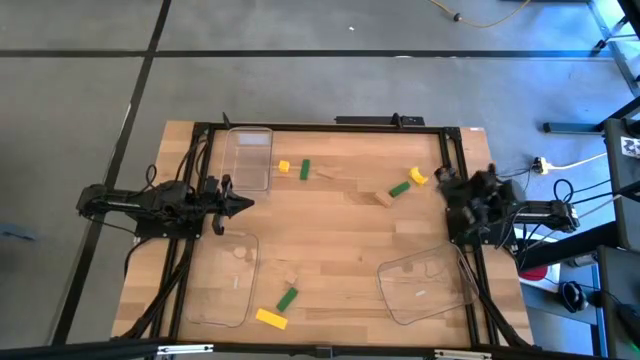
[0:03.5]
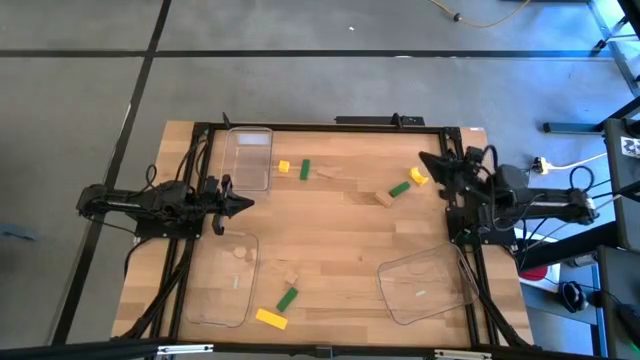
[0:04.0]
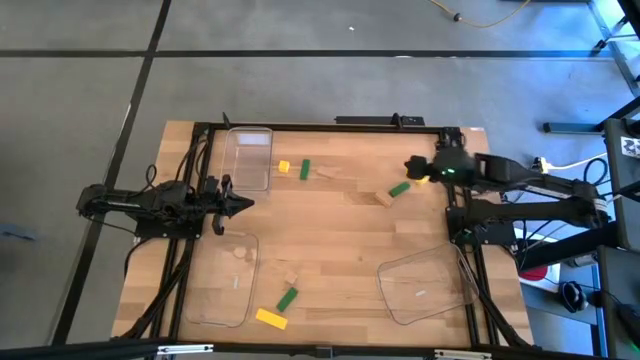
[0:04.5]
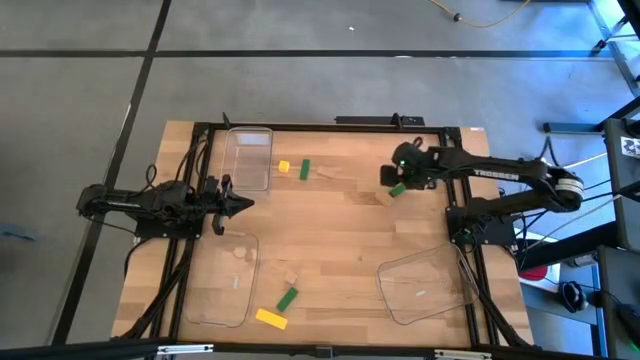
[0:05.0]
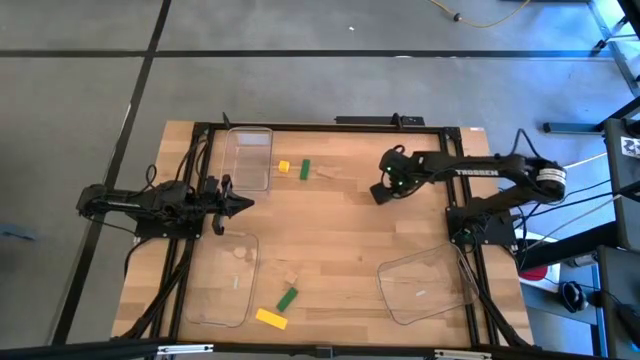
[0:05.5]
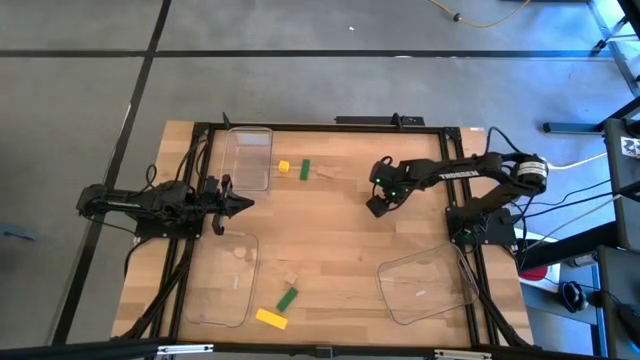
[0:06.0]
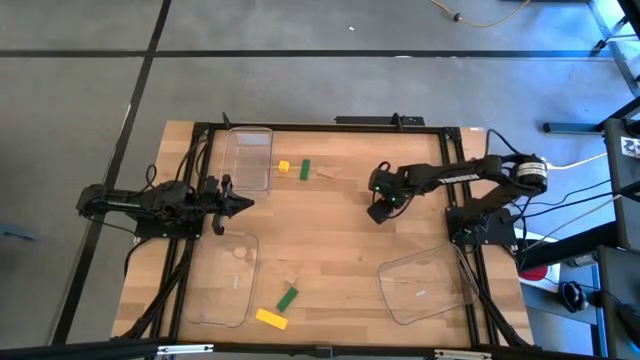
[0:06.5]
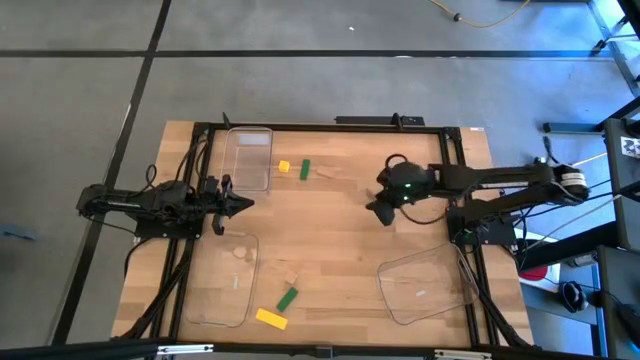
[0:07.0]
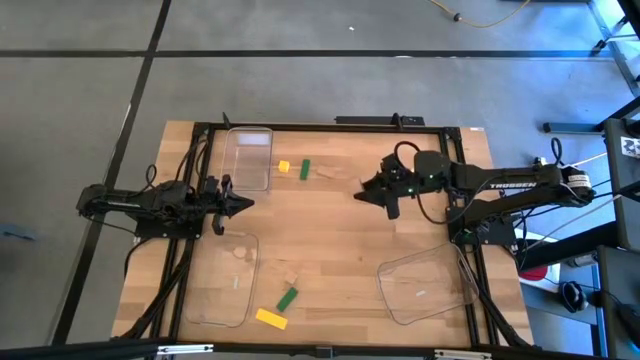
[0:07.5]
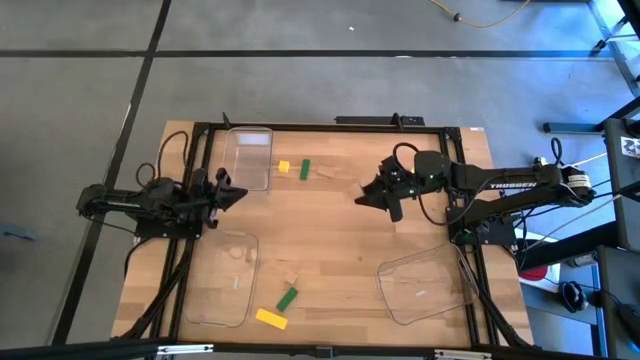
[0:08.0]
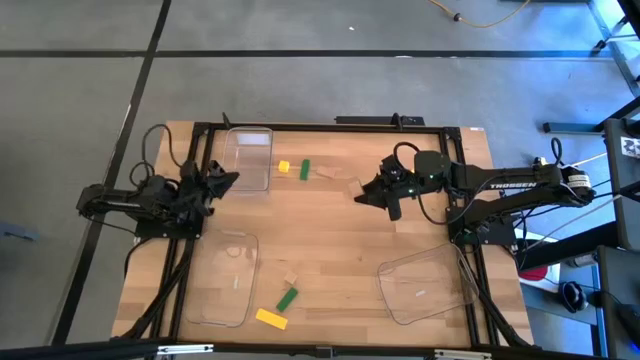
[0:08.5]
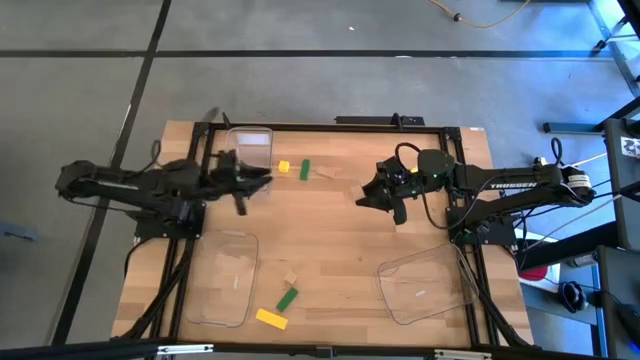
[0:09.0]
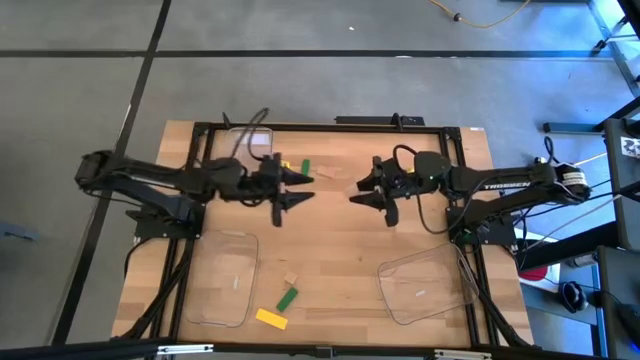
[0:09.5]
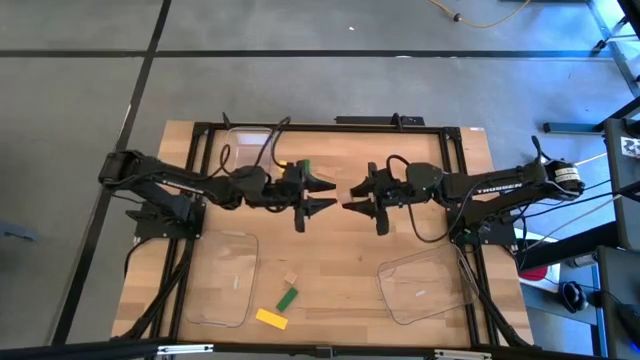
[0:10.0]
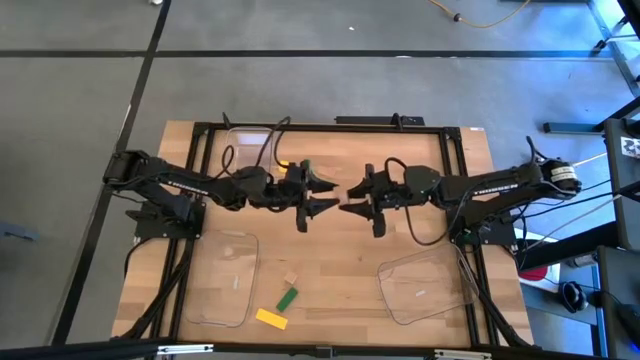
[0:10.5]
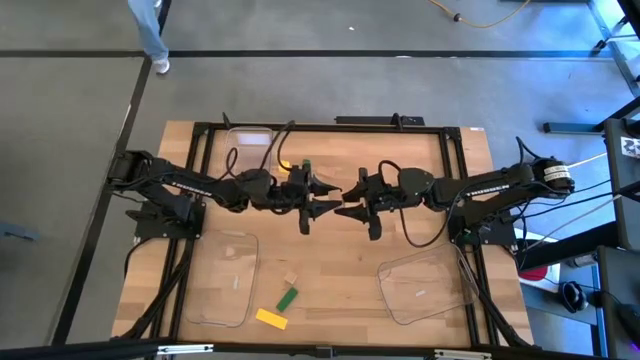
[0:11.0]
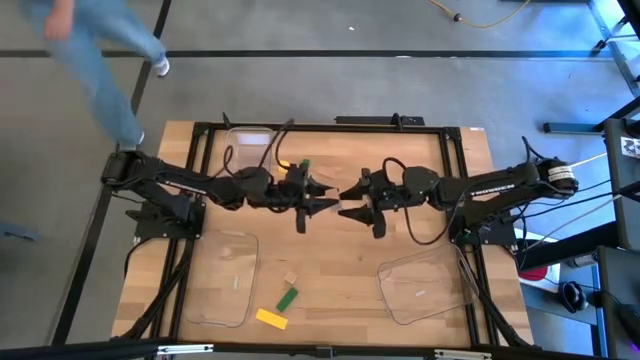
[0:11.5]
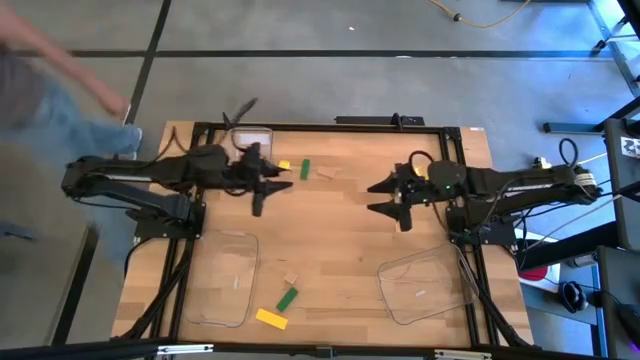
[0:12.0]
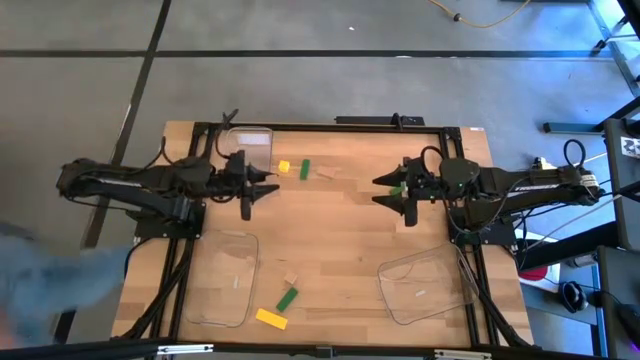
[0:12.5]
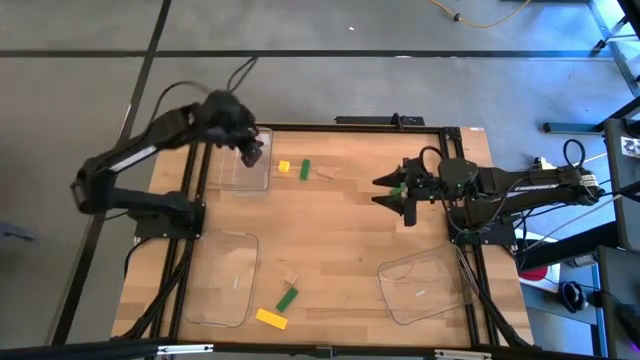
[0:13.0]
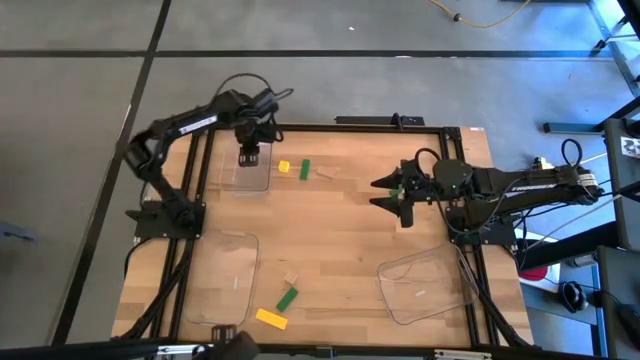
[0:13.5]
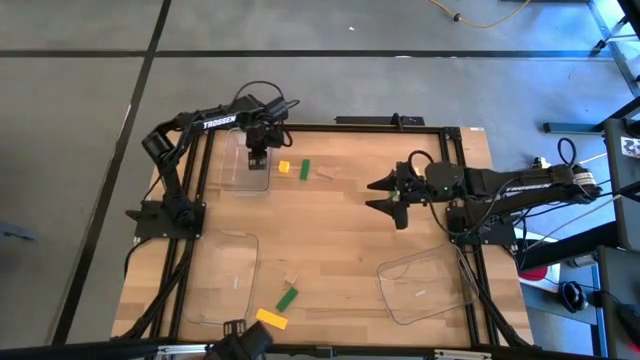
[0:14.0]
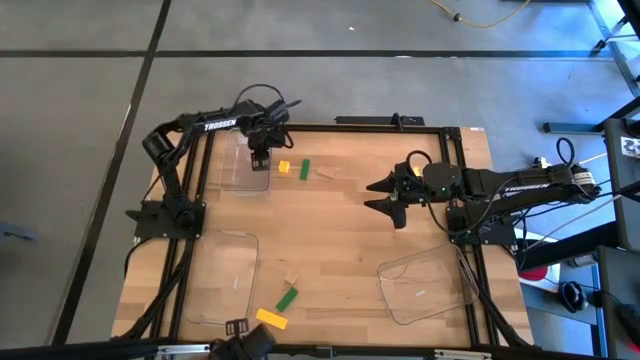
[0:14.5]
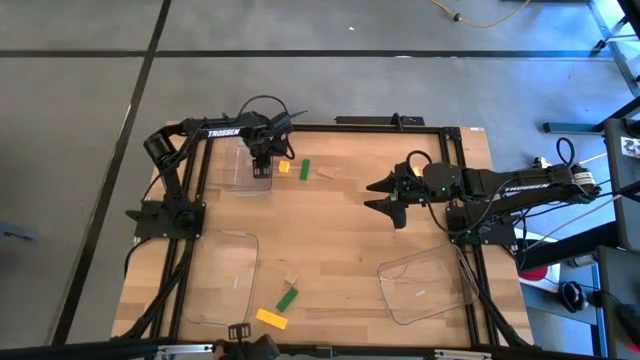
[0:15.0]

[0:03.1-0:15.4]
Task: Sort & place blocks by color
Put the right brown block into the top left transparent bin

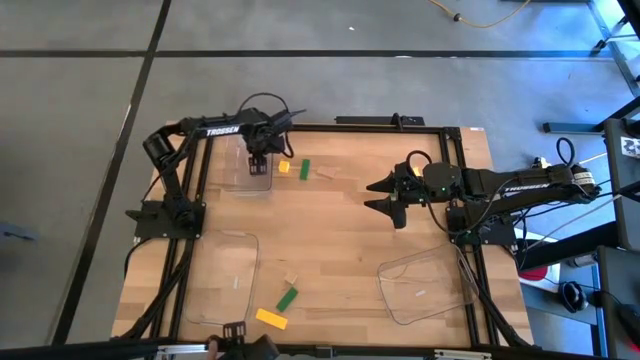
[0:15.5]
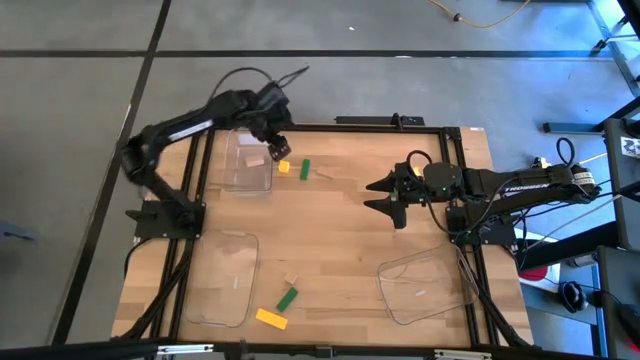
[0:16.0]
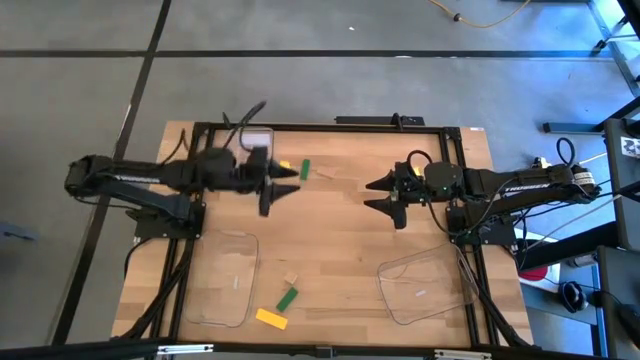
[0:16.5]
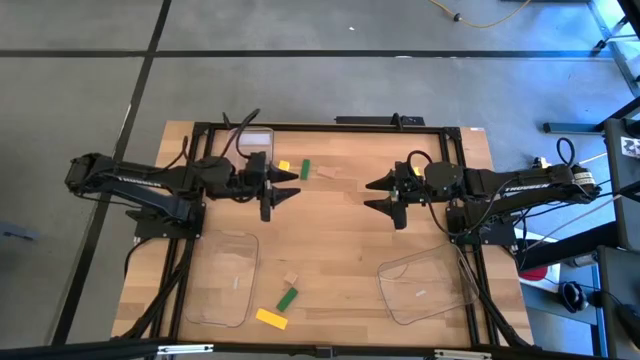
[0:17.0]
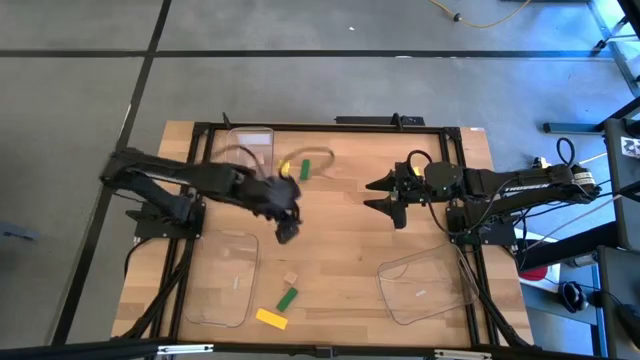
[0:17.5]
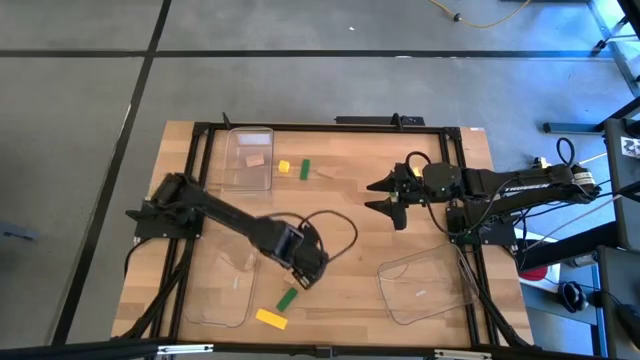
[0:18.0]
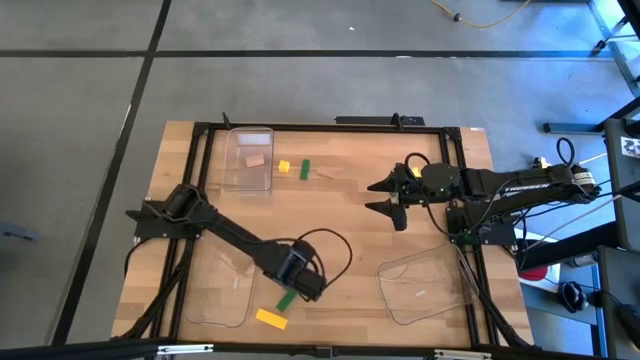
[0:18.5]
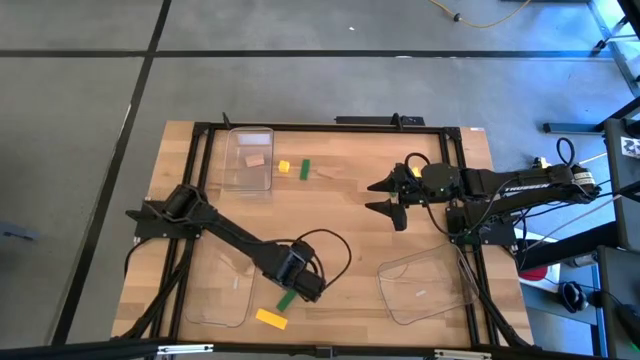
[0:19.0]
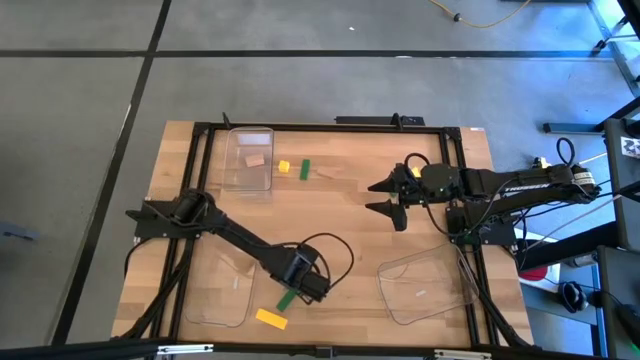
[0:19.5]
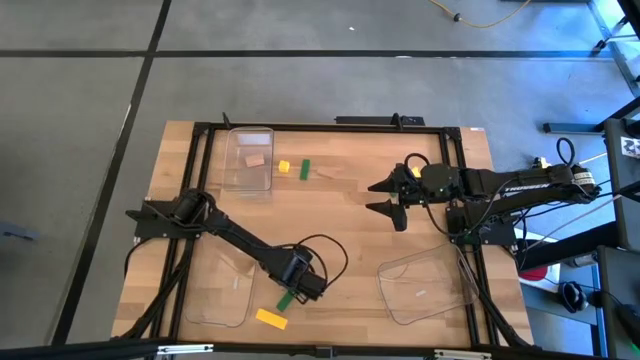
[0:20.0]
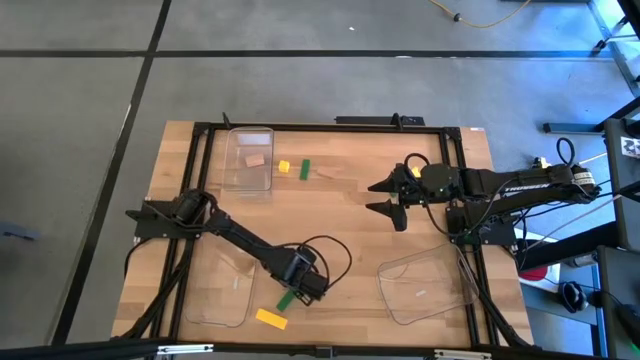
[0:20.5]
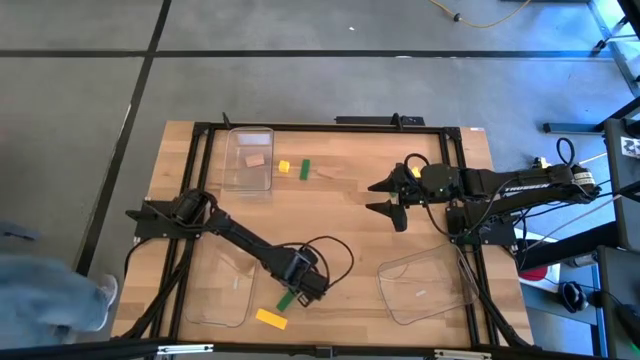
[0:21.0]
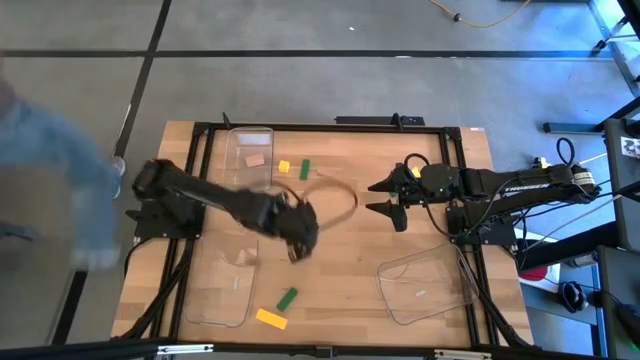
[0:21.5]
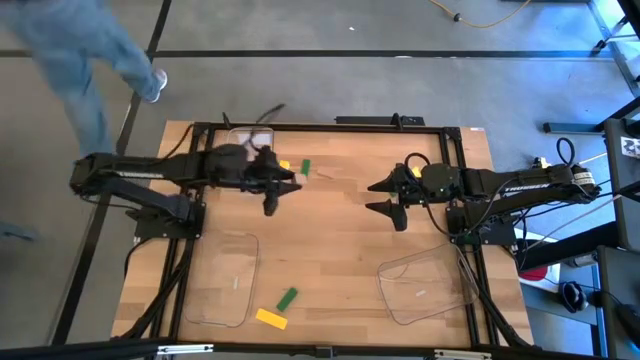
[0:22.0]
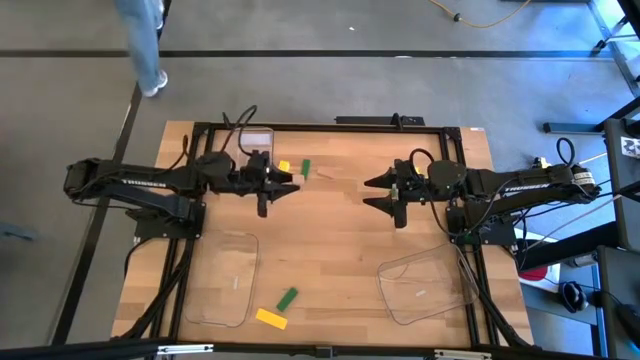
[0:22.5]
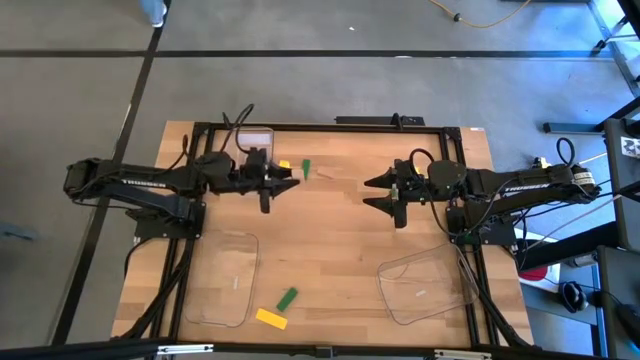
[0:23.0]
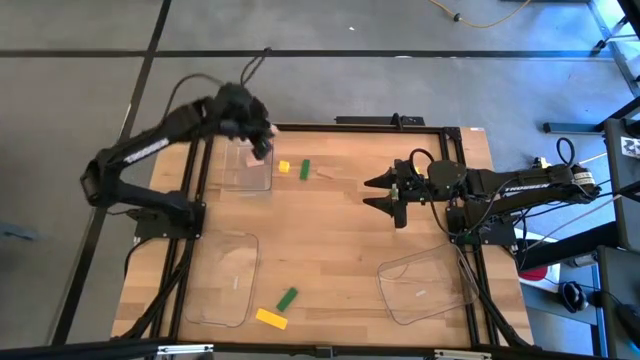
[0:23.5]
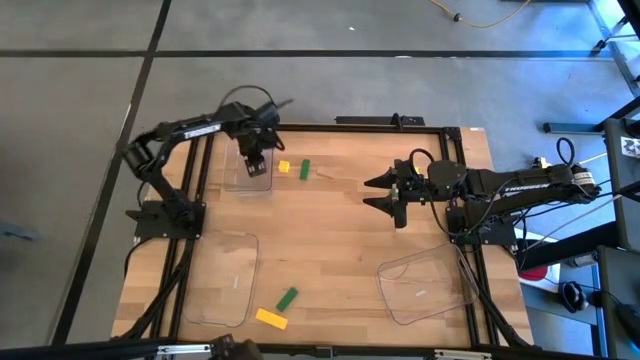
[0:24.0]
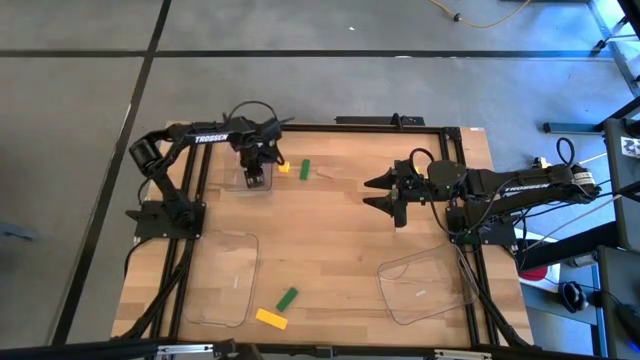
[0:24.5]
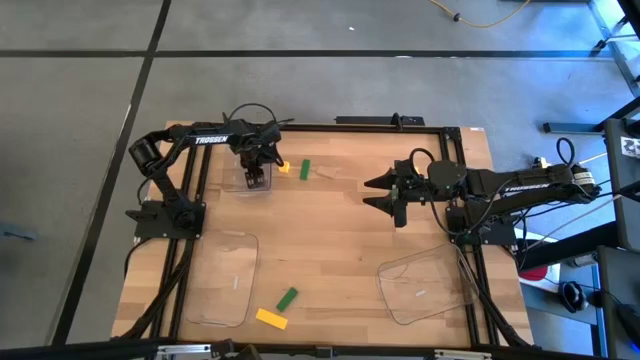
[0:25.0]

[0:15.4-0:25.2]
Put the bottom brown block into the top left transparent bin
